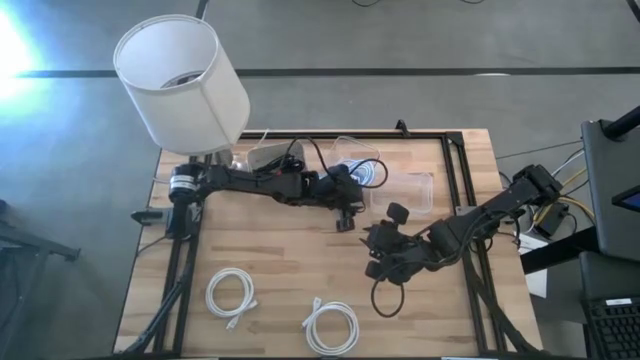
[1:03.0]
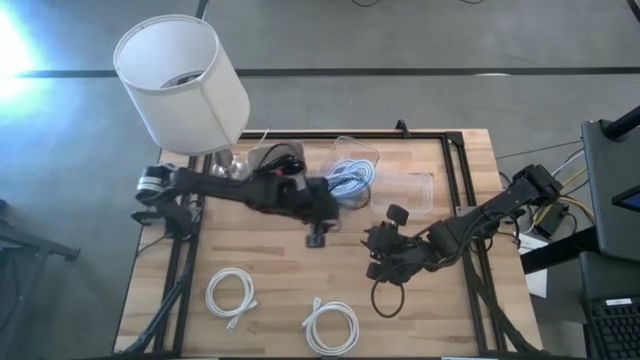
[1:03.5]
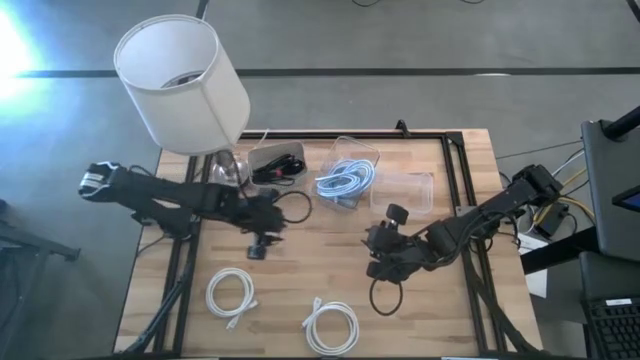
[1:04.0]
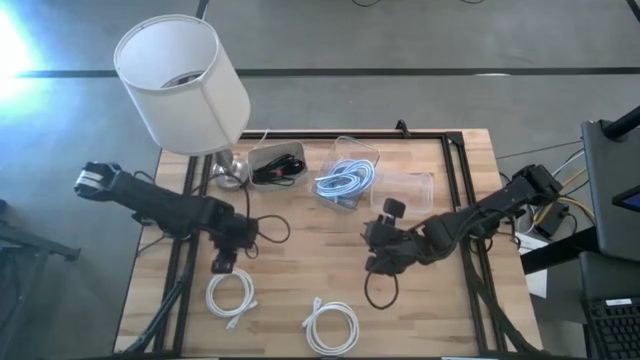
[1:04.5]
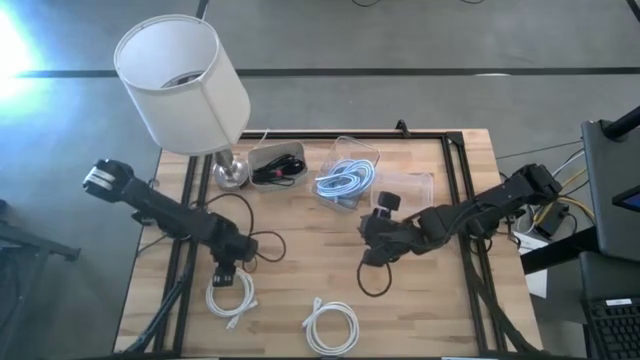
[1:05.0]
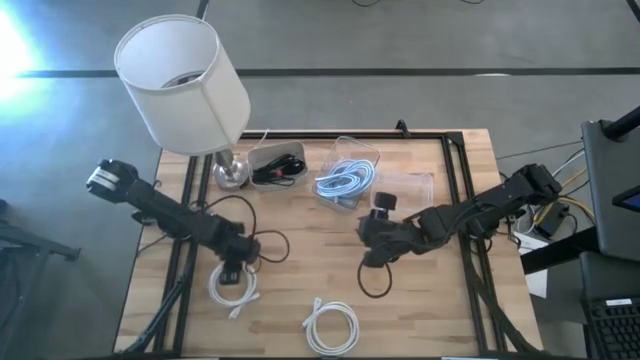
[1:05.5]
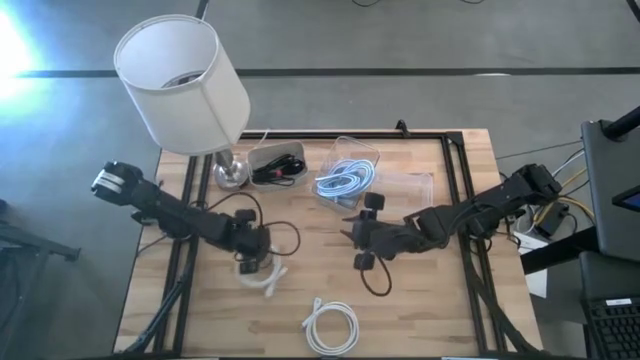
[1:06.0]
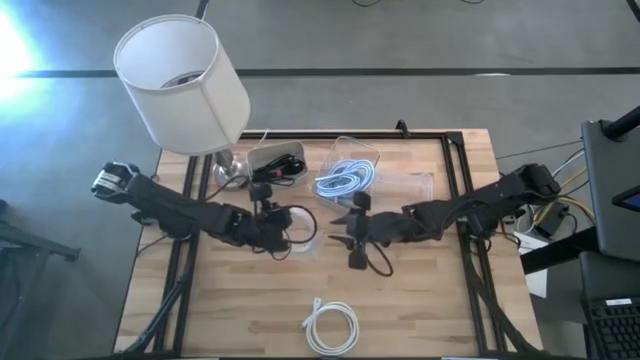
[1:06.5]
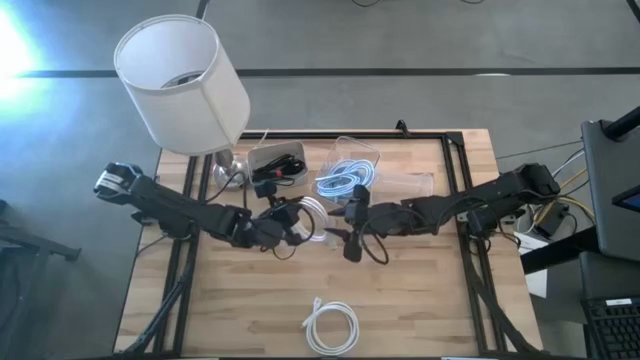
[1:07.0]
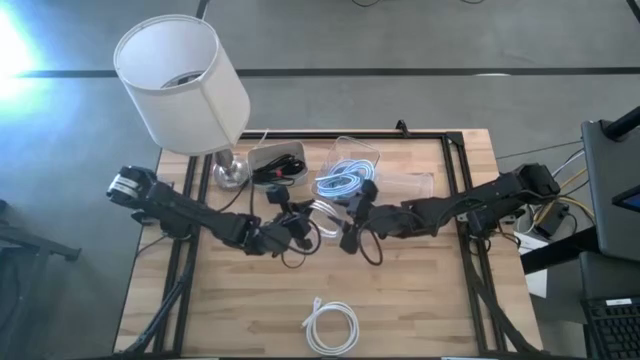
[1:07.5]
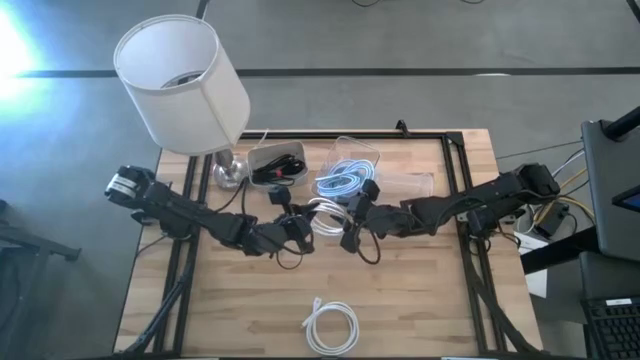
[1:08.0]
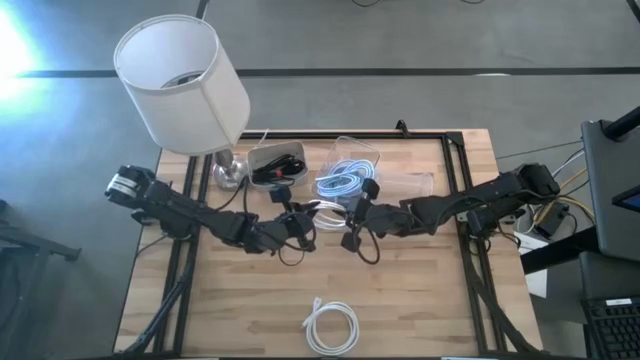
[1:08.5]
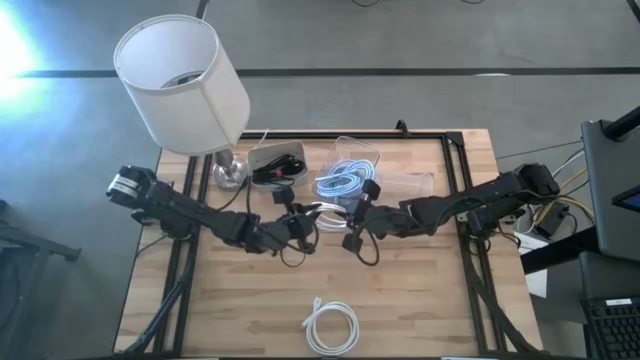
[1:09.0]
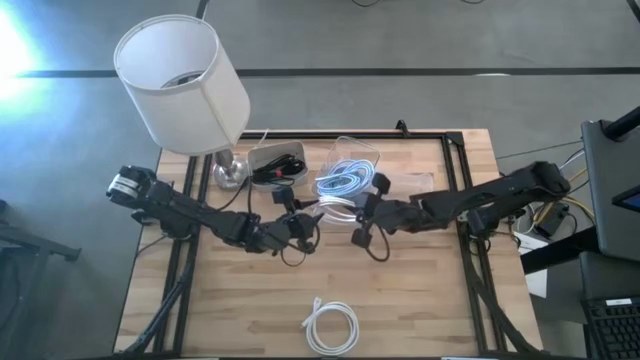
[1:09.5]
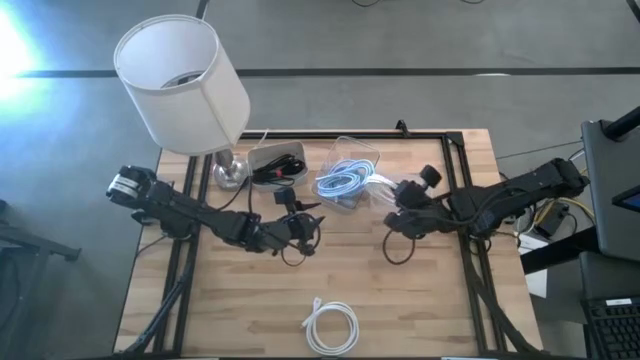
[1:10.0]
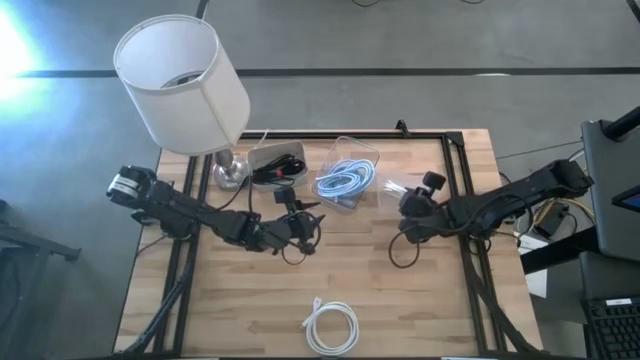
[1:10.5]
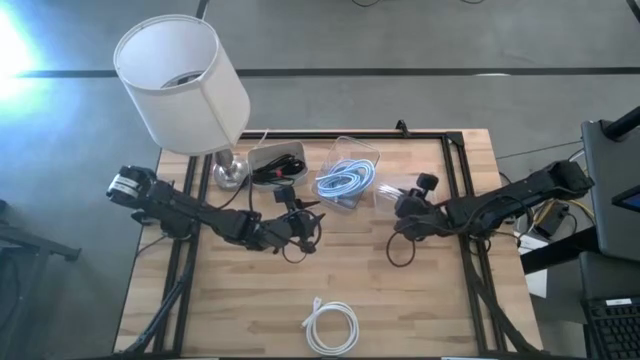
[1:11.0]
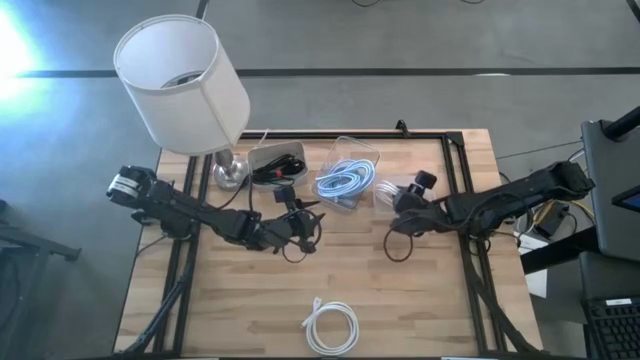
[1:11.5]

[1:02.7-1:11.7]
Task: Pick & Place USB Port
Put the left white USB cable into the right transparent bin

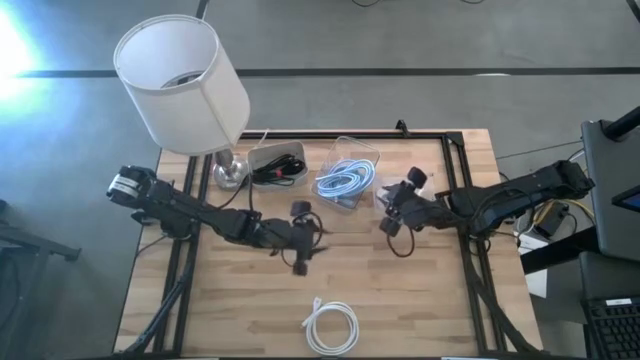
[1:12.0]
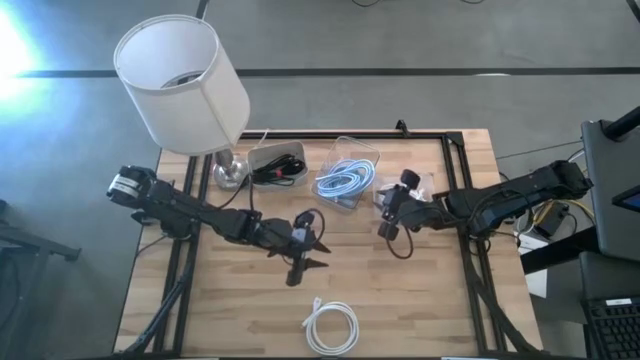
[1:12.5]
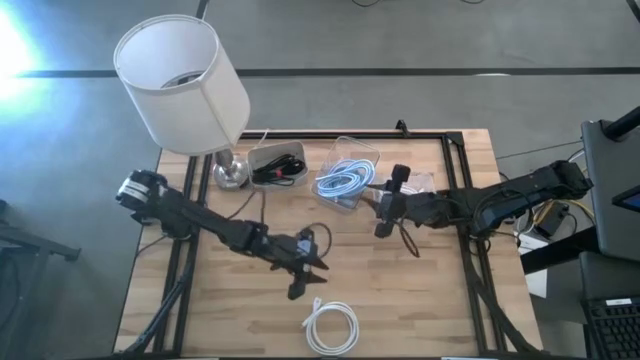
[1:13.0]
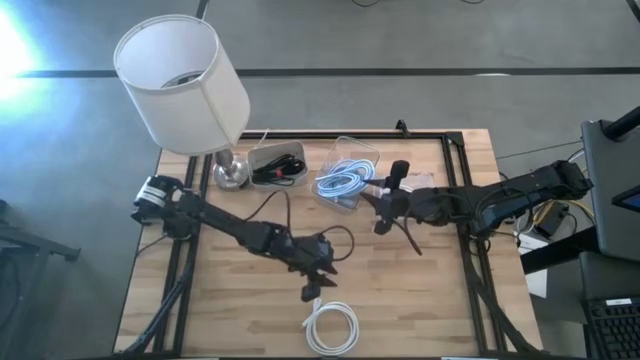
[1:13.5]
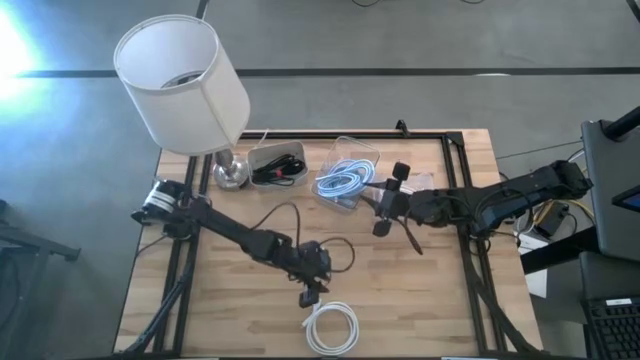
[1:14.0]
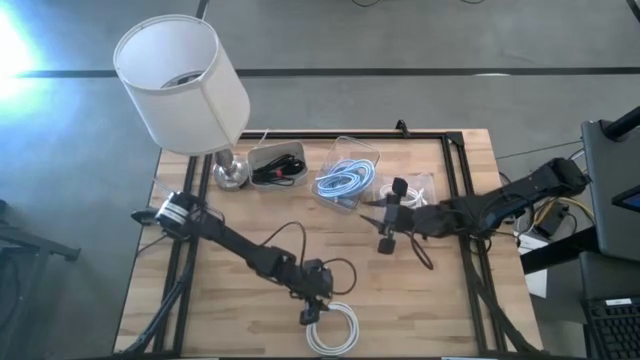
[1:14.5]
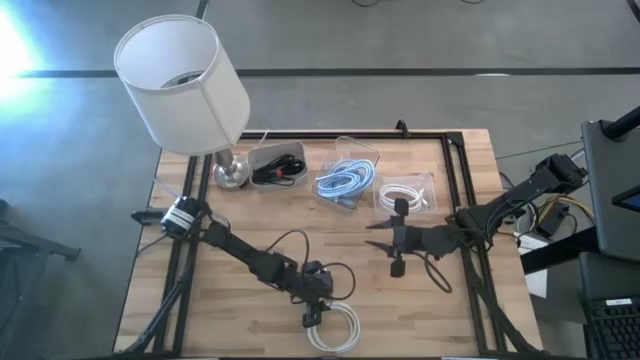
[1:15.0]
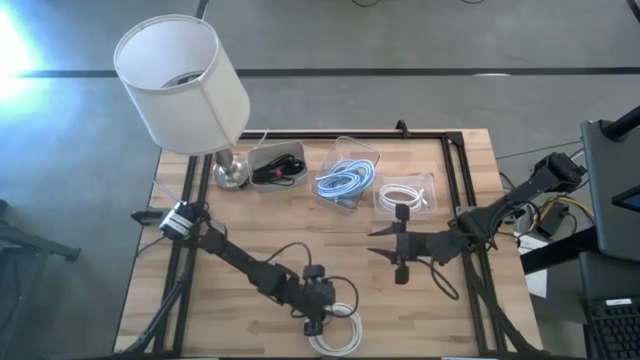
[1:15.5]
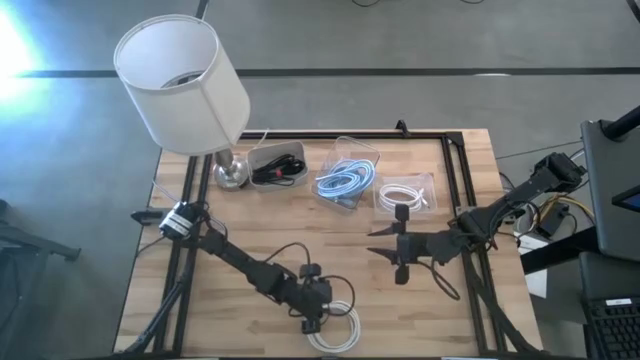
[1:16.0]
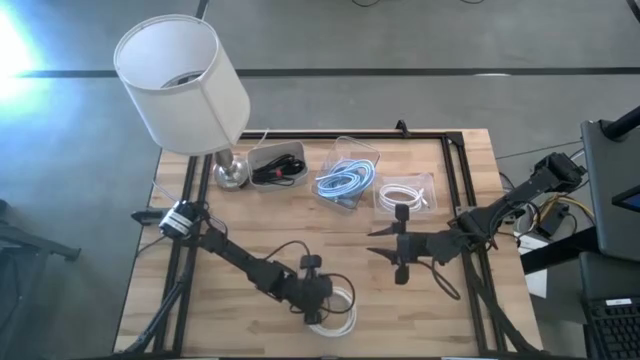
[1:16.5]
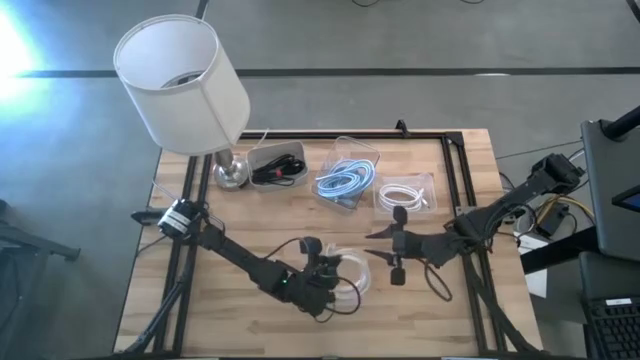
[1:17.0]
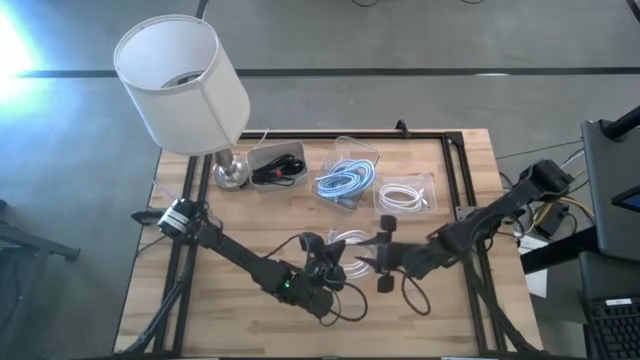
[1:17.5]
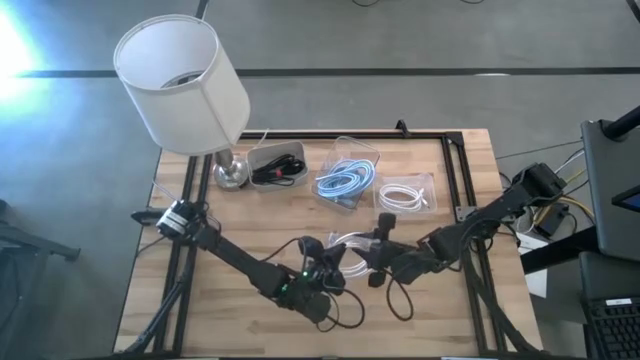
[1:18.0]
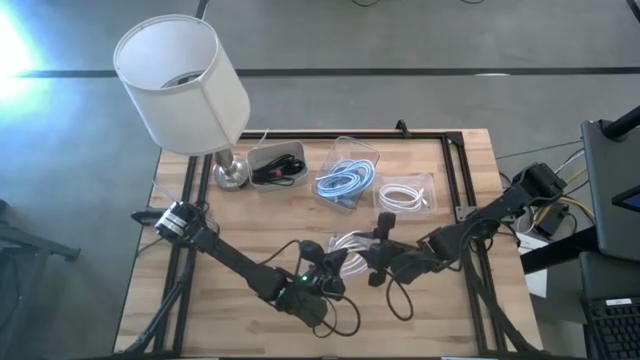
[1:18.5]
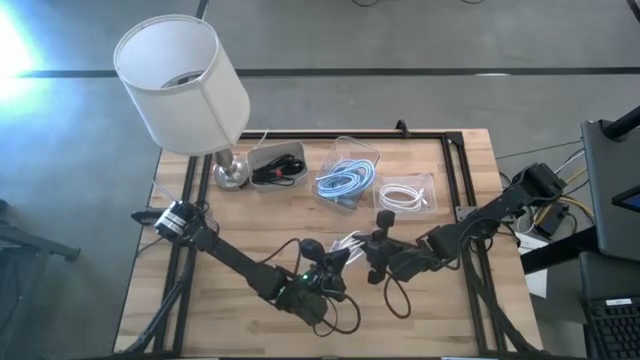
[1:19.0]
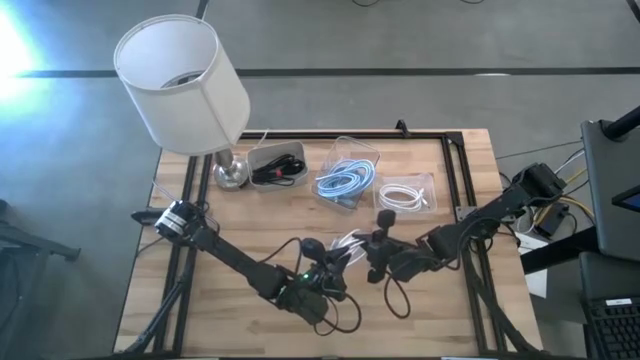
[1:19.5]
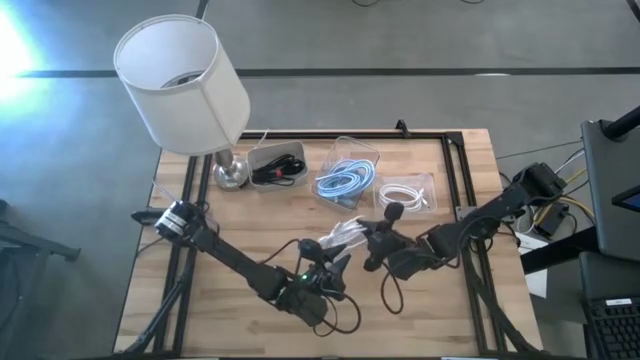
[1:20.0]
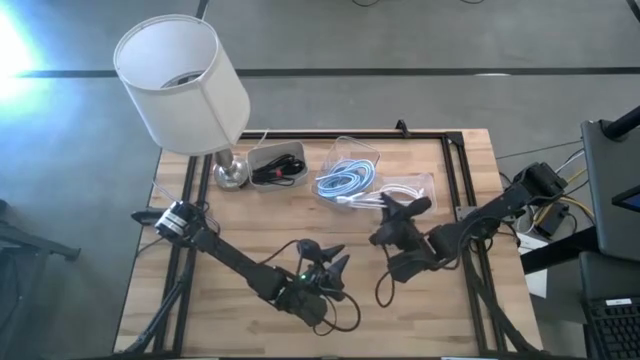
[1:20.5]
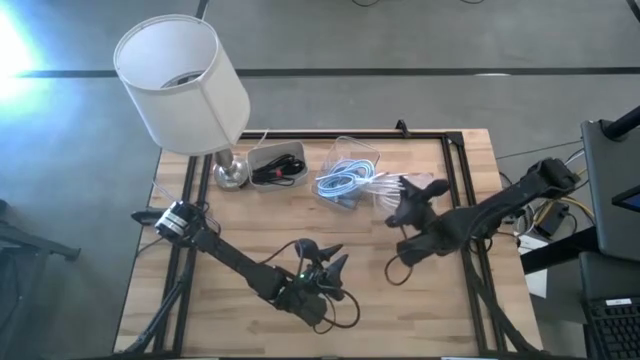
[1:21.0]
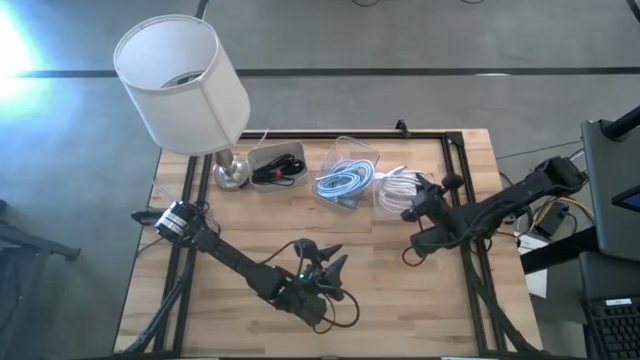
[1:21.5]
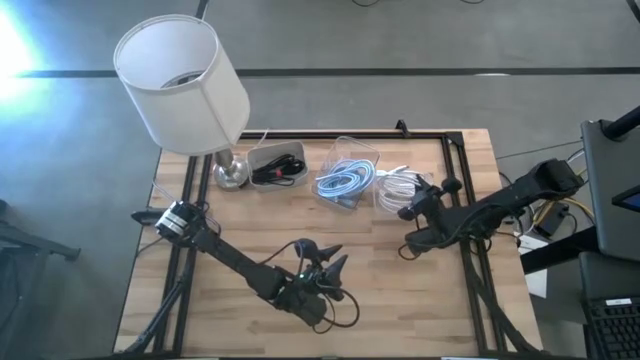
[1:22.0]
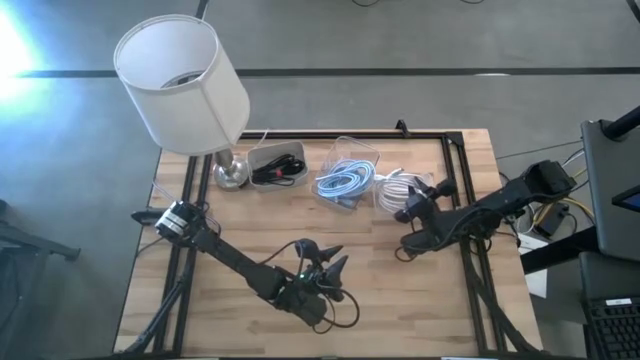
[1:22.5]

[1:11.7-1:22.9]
Put the white USB cable into the right transparent bin

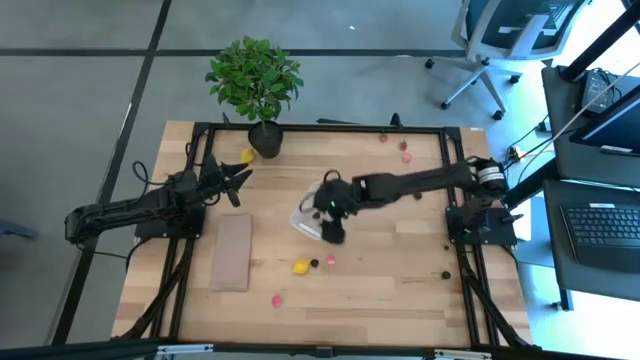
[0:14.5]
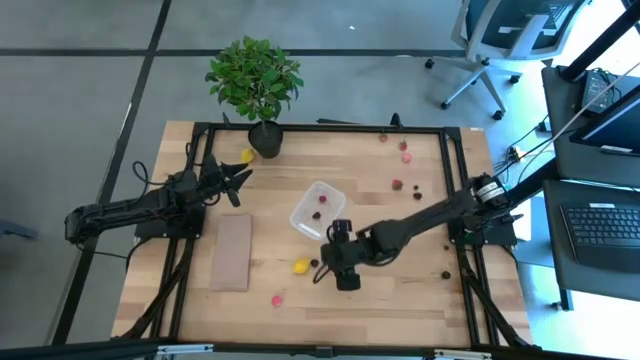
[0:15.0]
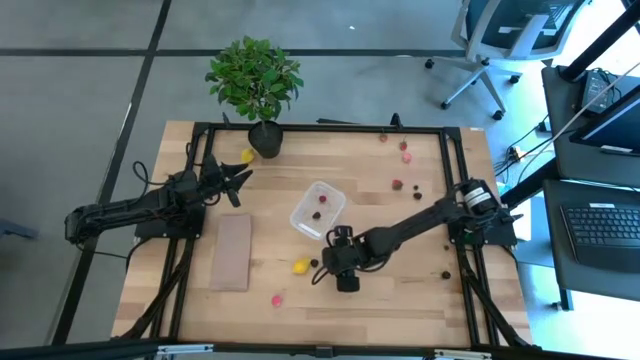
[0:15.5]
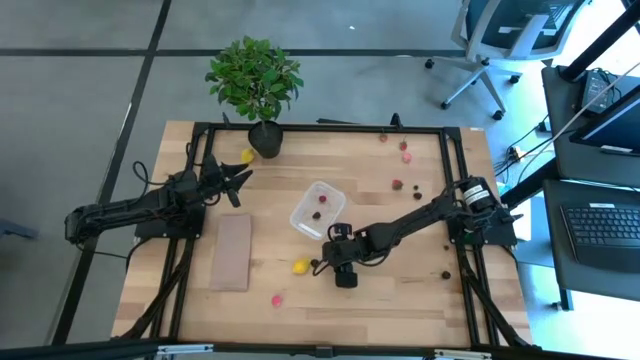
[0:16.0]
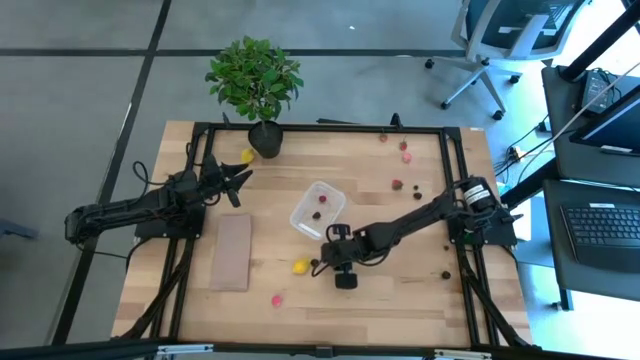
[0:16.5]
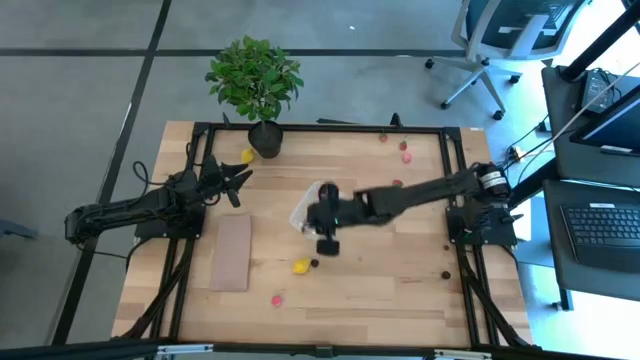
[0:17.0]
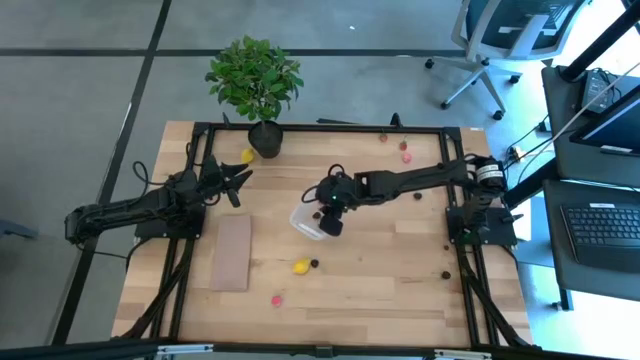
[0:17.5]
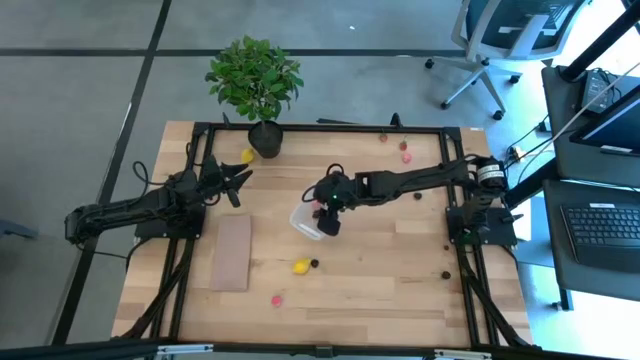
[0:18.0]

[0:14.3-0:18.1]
Task: Pick and placing Produce into tupperware
Put the center peach into the transparent bin
